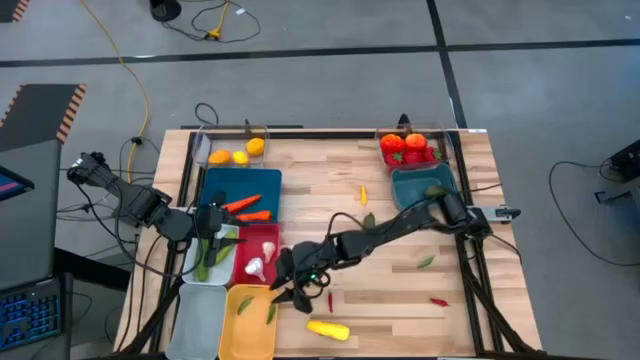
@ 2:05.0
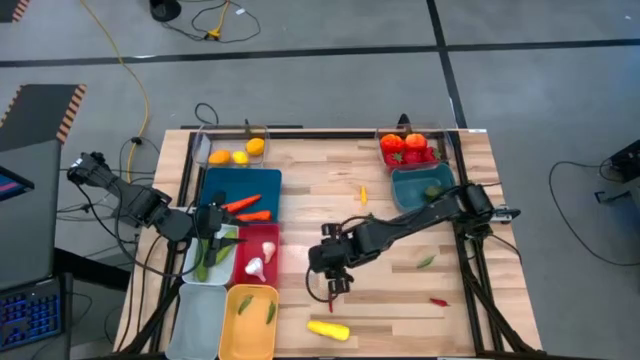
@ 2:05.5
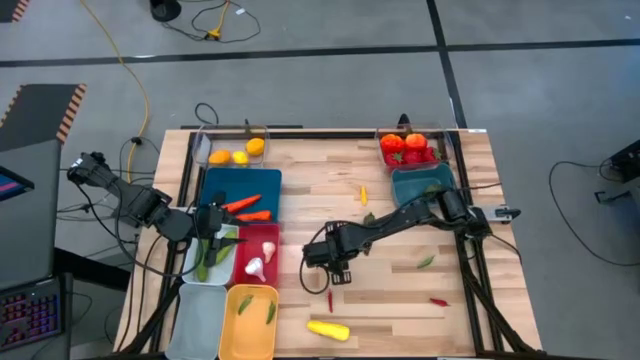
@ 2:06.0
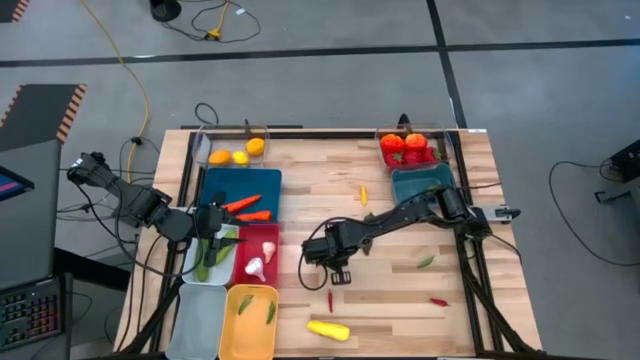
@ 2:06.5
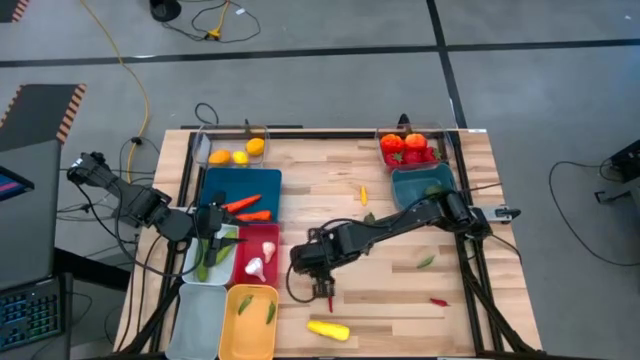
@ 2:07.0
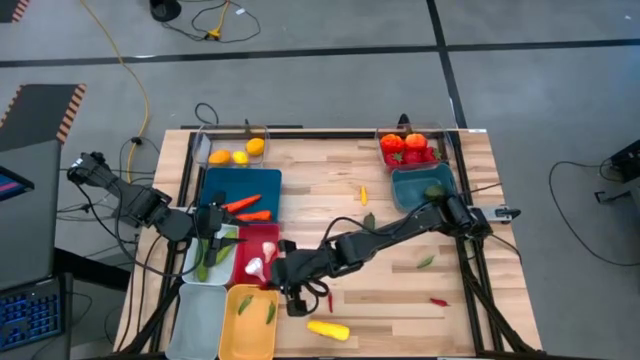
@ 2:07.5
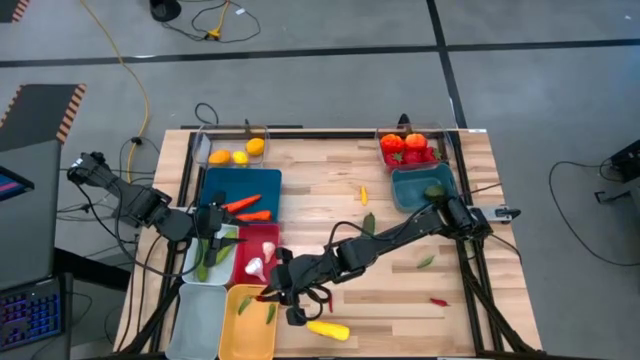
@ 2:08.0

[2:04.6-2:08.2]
Task: Sort produce into baskets
Put the top red chili pepper into the yellow bin

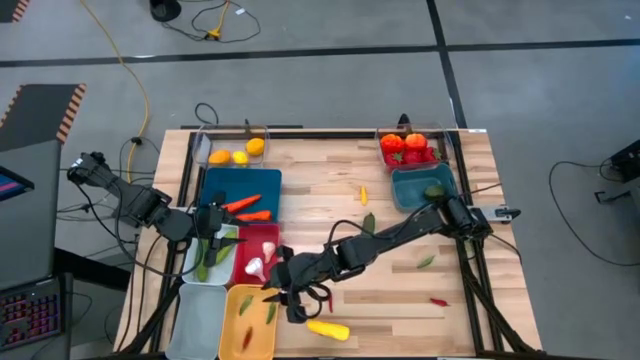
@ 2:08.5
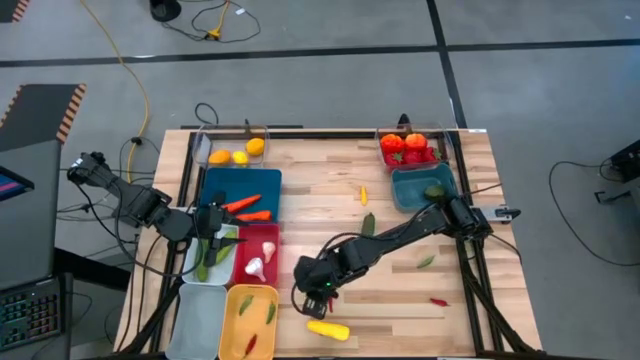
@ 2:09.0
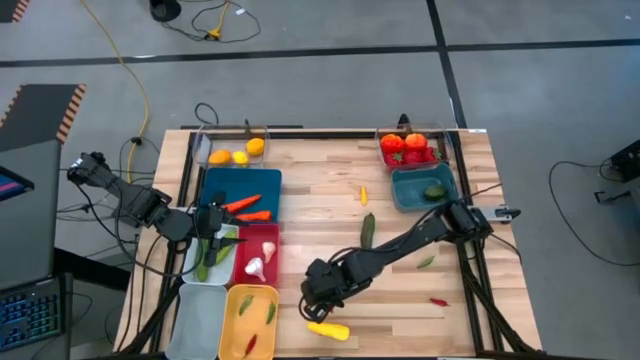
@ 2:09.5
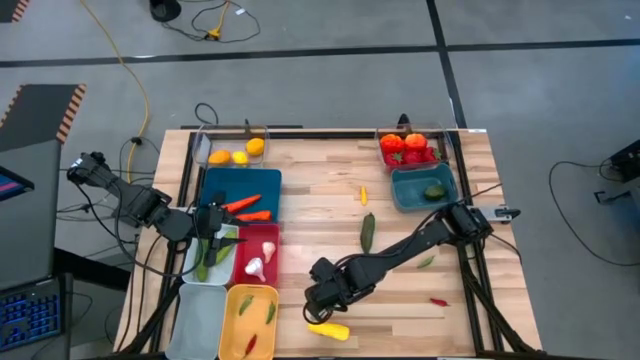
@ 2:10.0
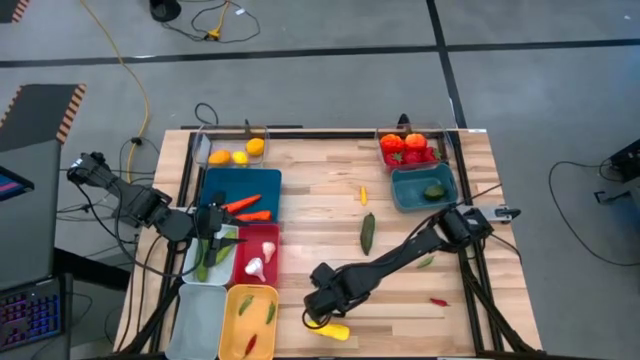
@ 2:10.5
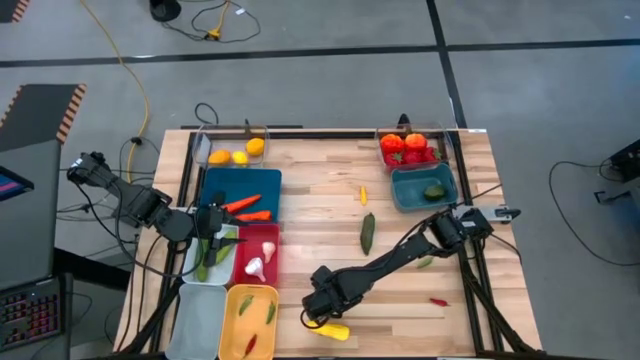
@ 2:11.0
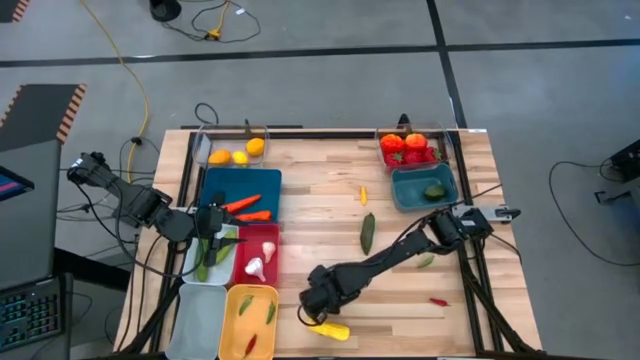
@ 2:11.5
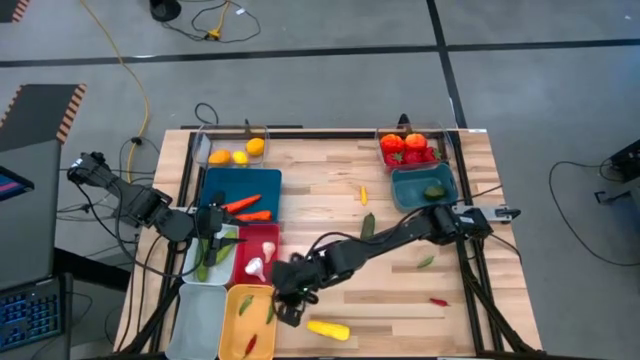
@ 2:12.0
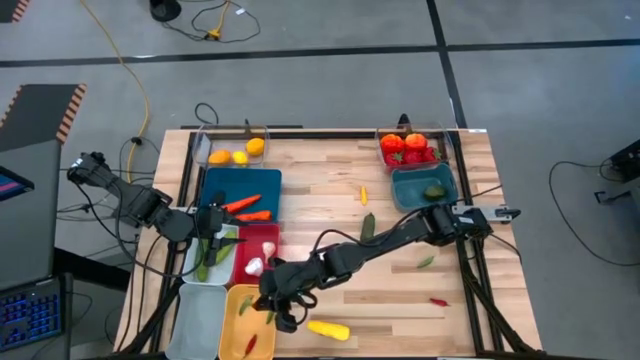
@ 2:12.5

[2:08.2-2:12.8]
Put the left red chili pepper into the yellow bin

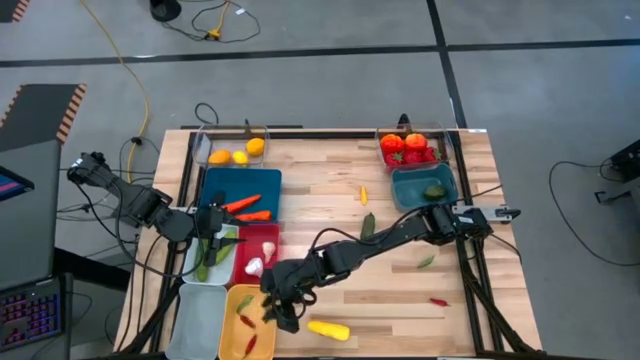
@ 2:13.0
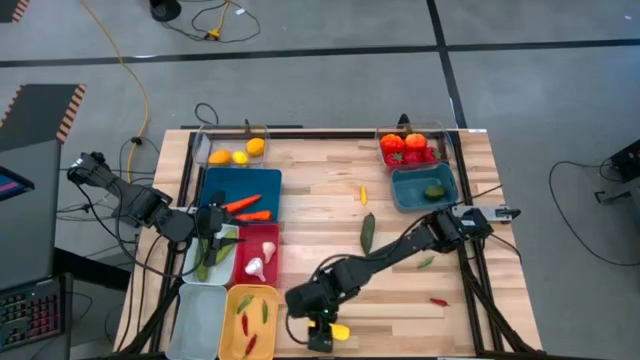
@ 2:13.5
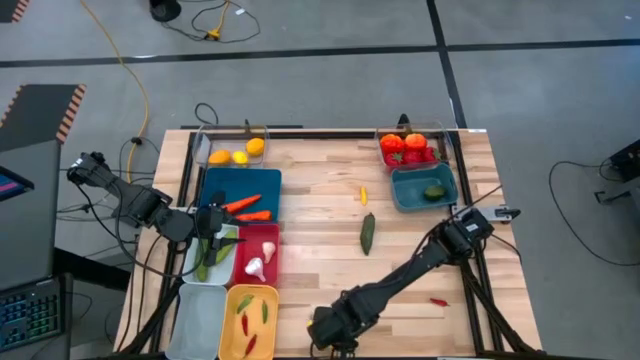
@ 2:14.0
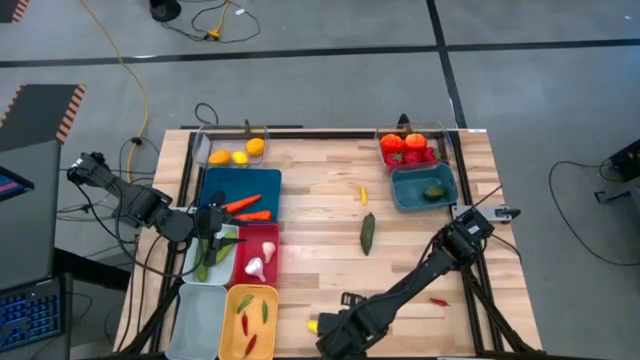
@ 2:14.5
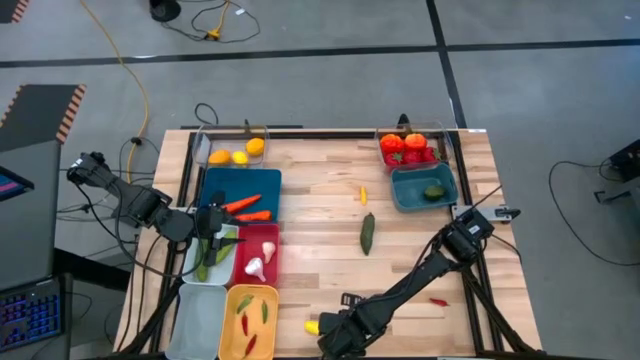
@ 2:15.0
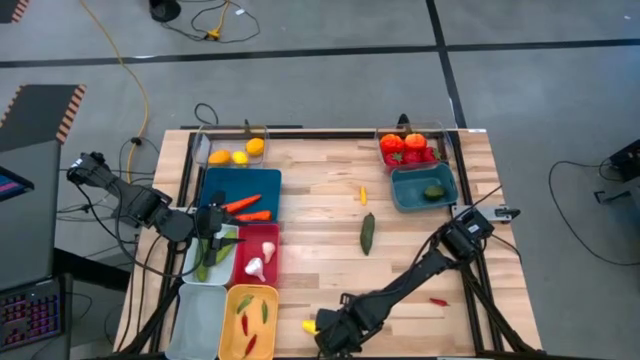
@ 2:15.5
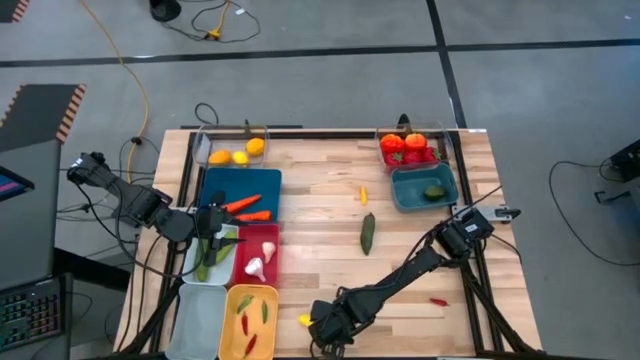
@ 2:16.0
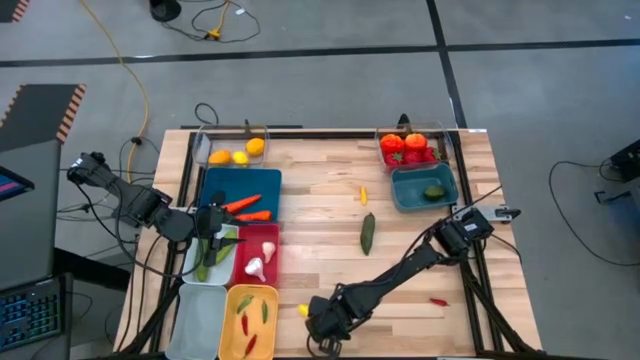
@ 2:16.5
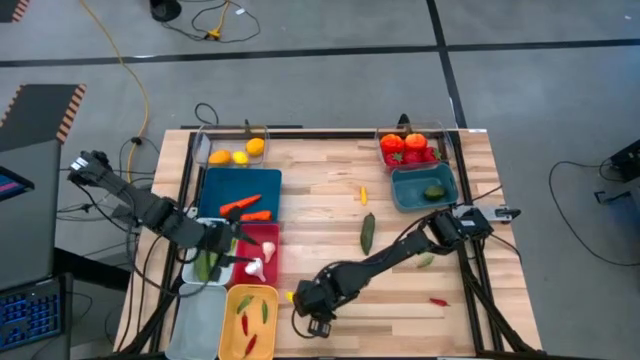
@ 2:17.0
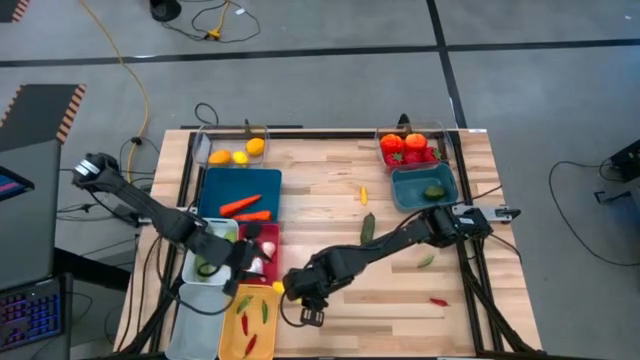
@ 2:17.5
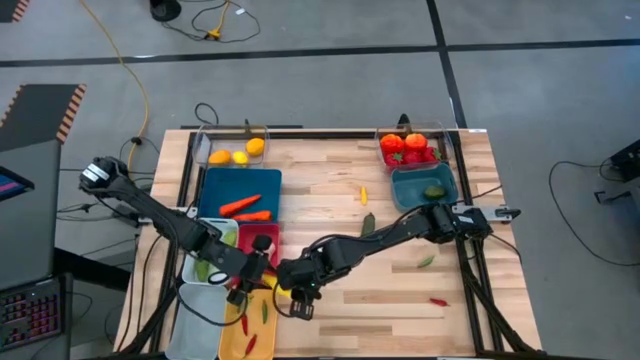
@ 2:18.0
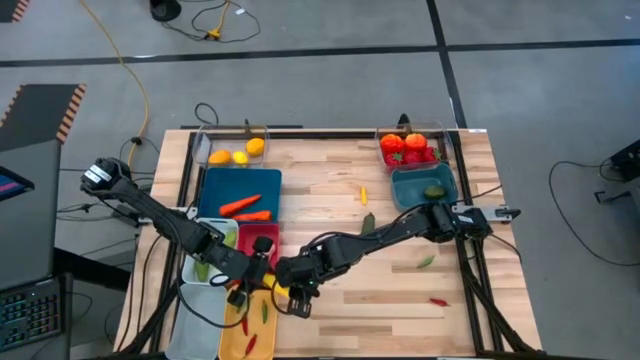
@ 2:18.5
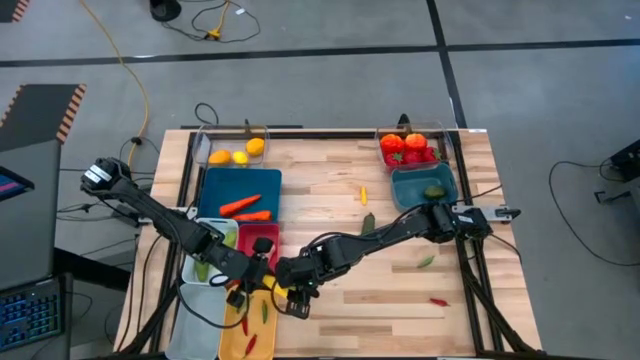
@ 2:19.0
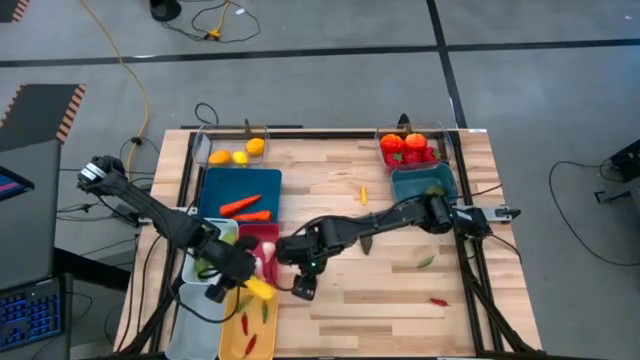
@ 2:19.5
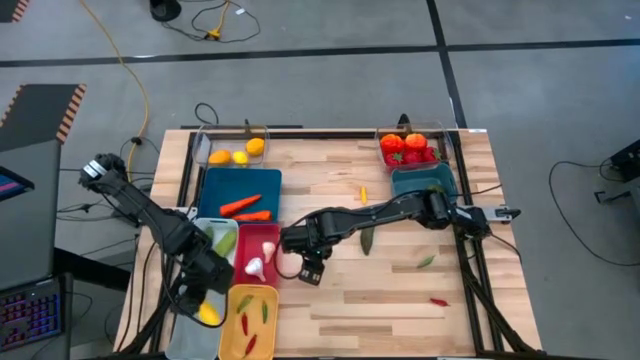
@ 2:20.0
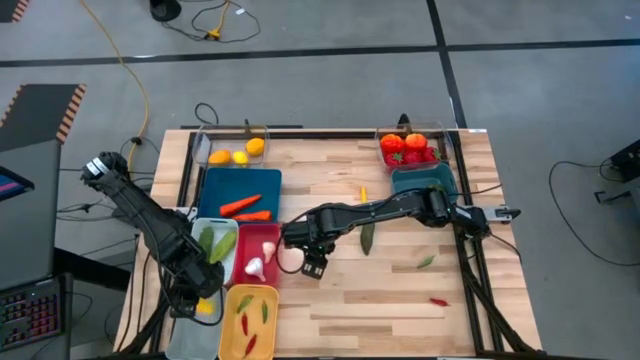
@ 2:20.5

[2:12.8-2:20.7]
Put the bottom yellow corn into the gray bin

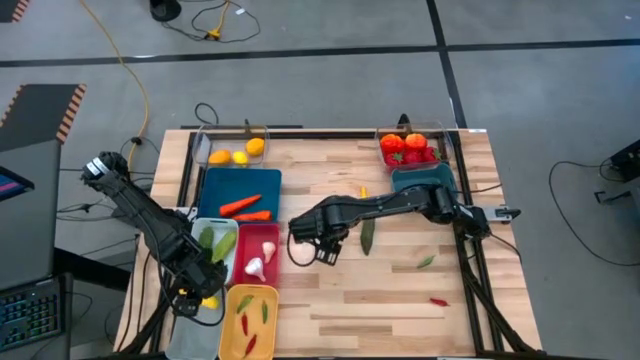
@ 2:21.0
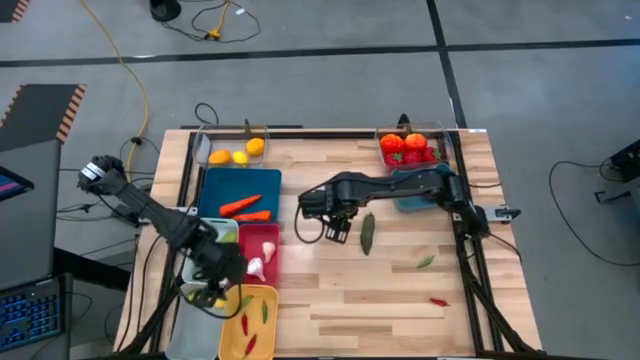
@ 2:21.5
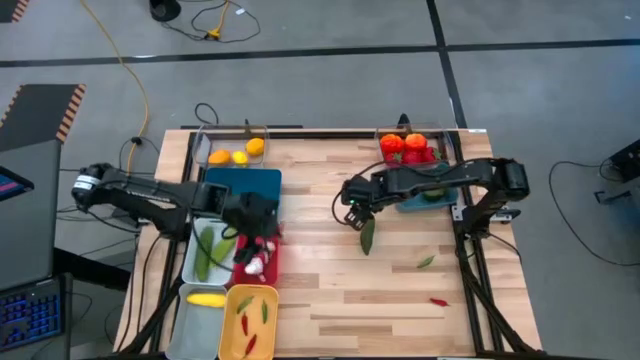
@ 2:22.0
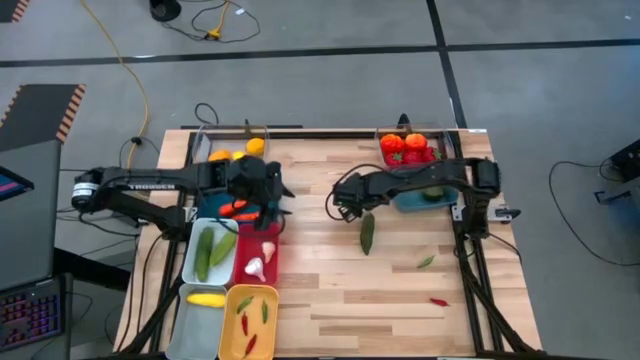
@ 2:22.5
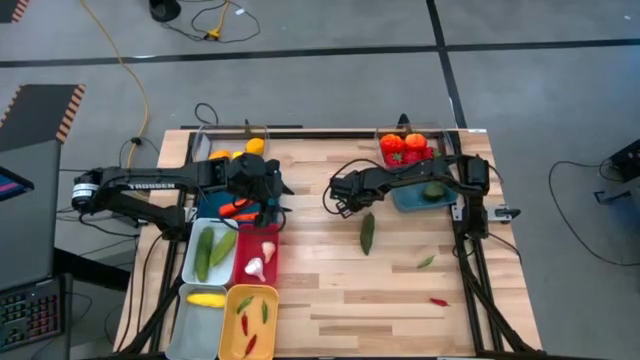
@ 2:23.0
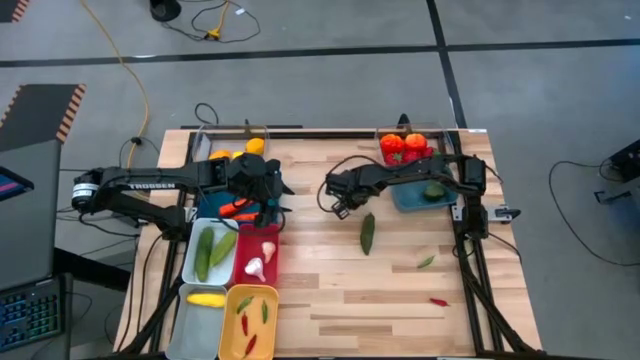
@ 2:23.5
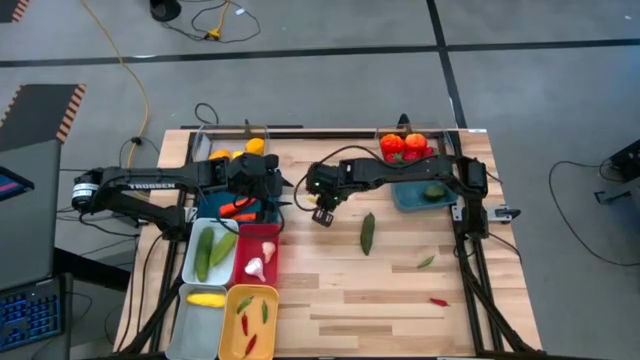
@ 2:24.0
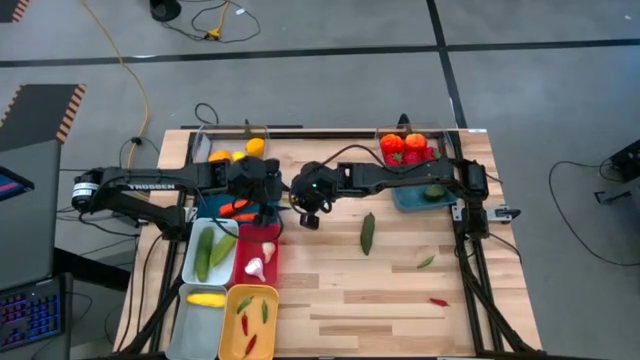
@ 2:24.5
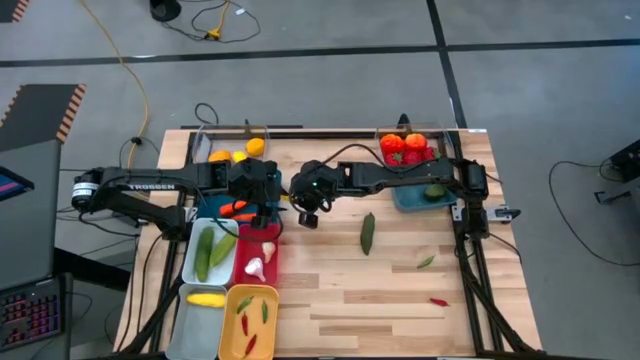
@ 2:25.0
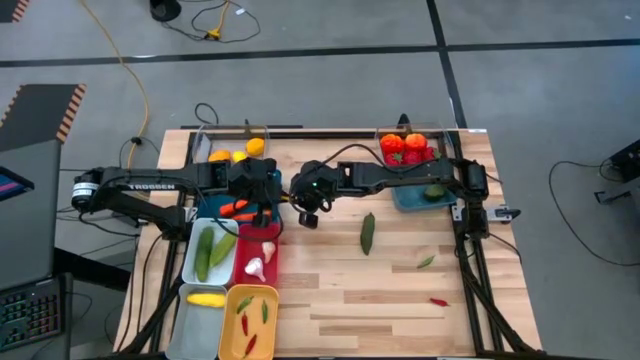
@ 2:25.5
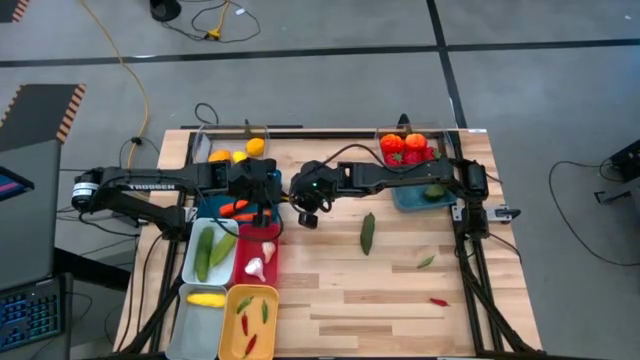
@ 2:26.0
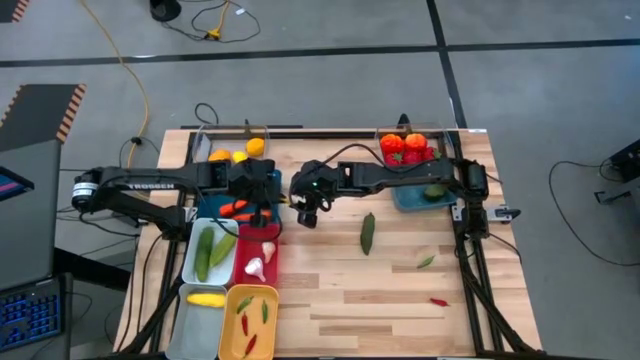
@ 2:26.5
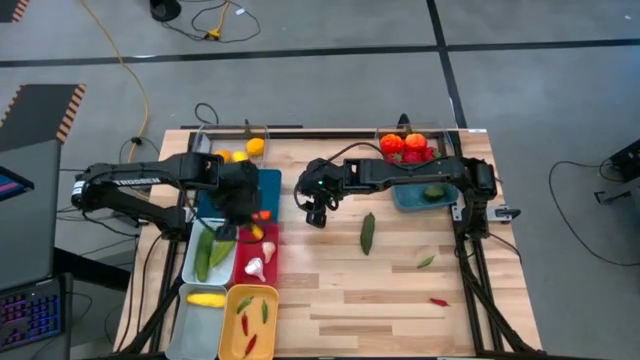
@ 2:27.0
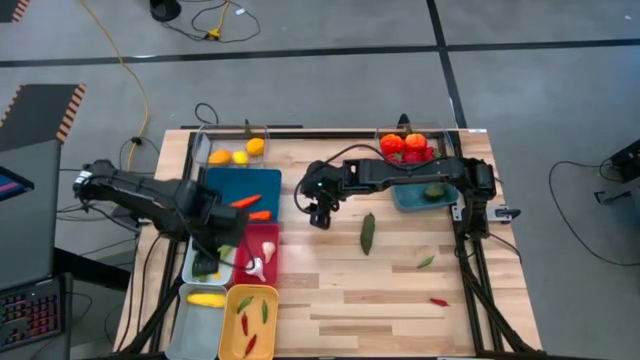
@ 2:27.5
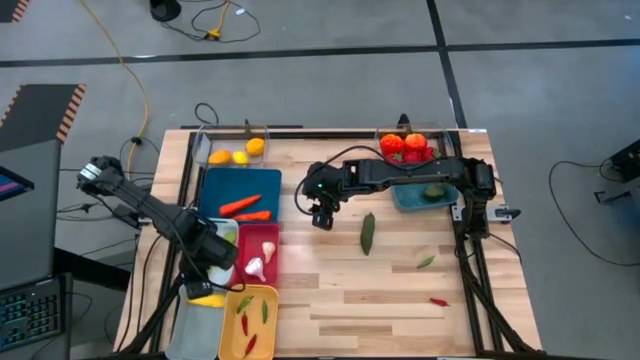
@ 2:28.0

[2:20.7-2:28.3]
Put the yellow corn into the gray bin
